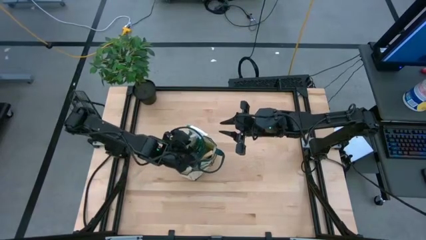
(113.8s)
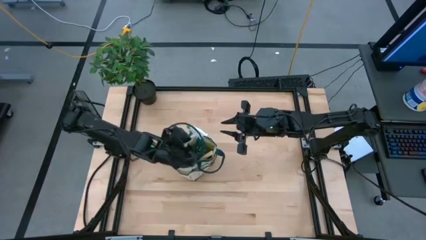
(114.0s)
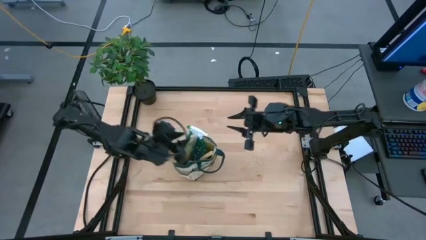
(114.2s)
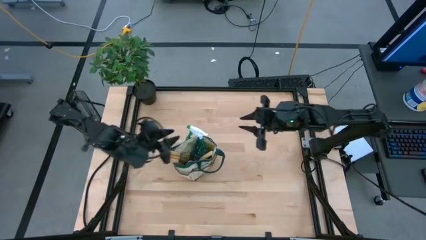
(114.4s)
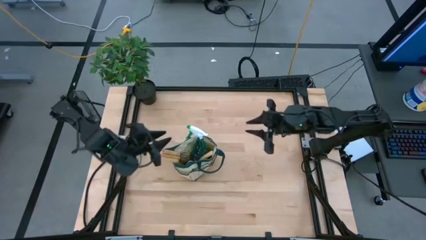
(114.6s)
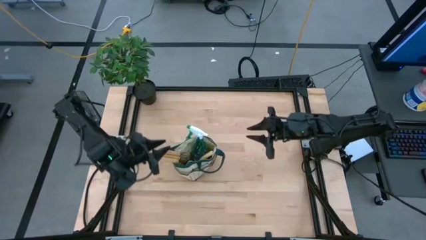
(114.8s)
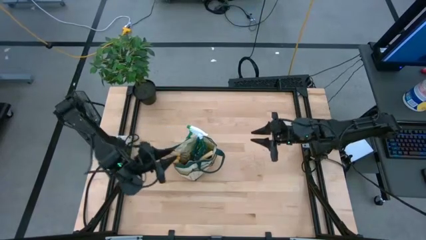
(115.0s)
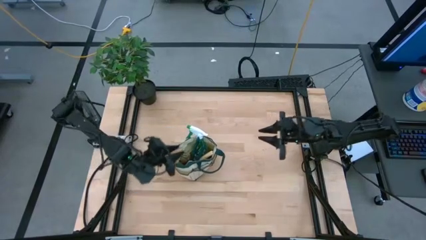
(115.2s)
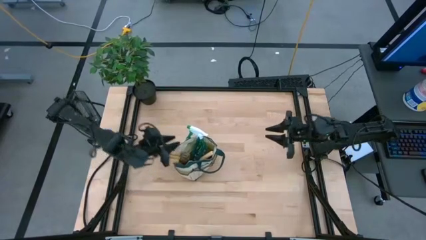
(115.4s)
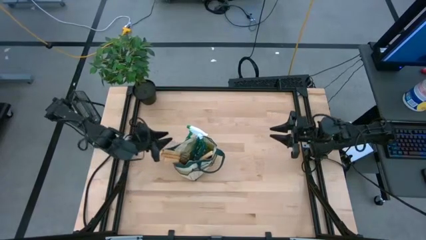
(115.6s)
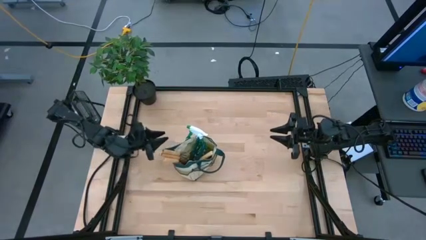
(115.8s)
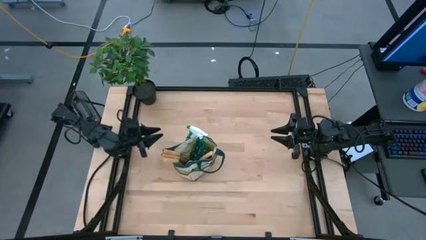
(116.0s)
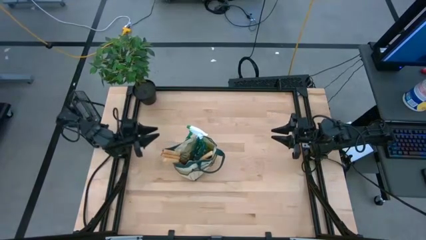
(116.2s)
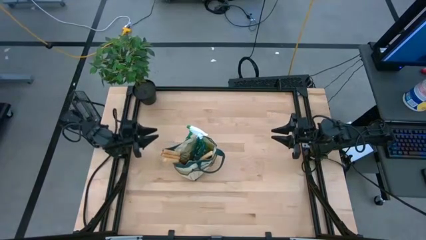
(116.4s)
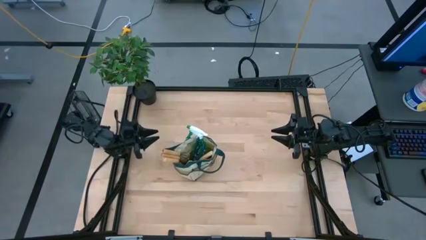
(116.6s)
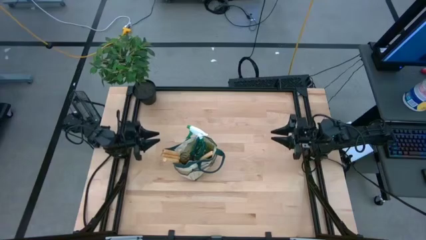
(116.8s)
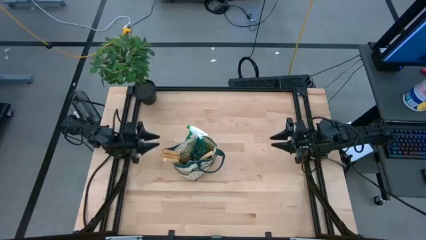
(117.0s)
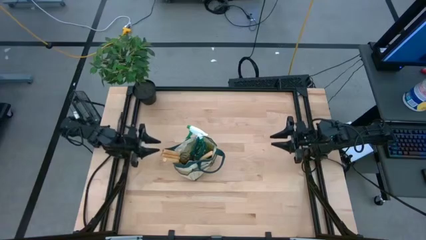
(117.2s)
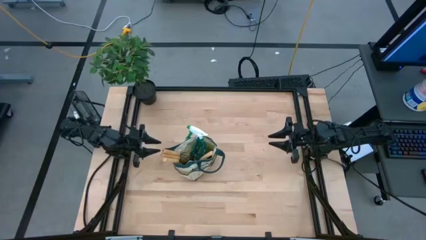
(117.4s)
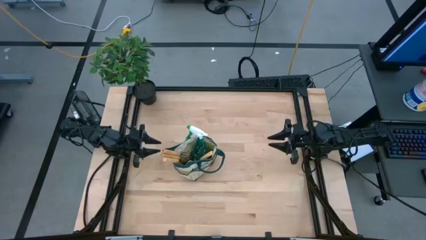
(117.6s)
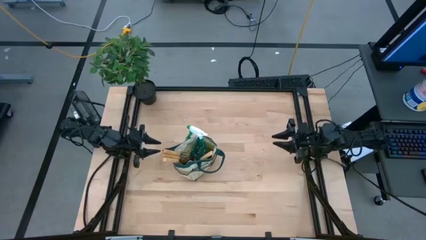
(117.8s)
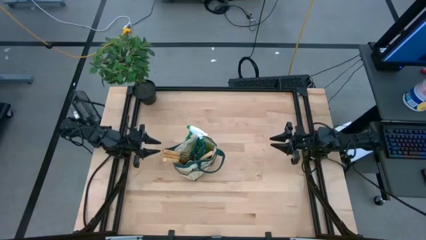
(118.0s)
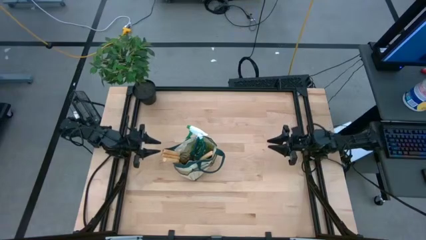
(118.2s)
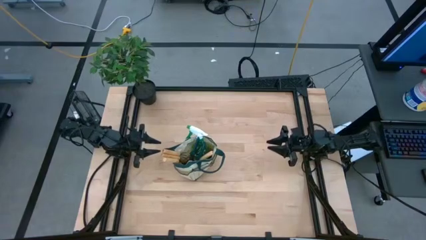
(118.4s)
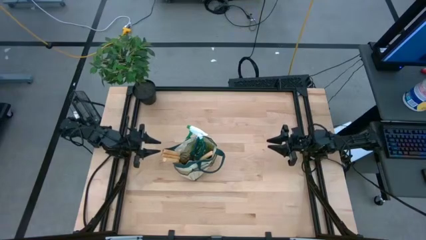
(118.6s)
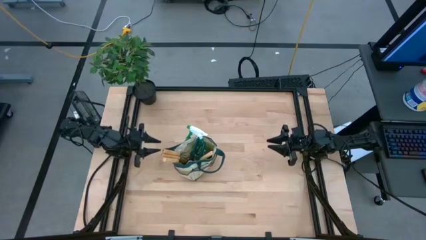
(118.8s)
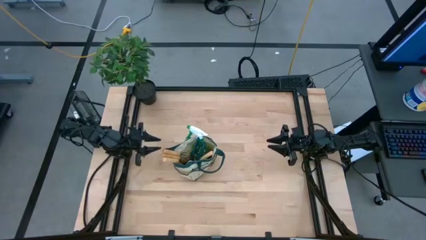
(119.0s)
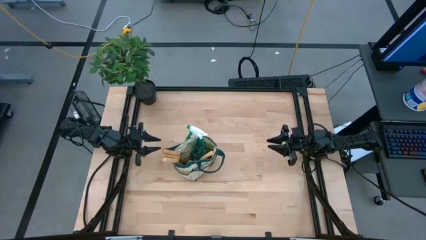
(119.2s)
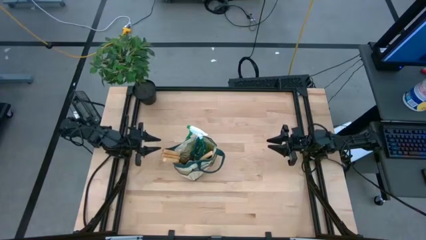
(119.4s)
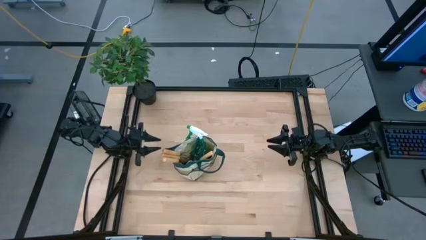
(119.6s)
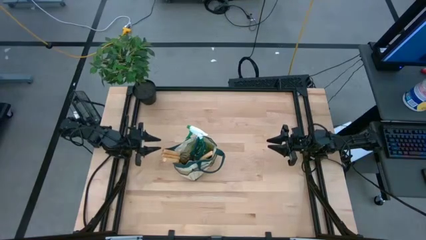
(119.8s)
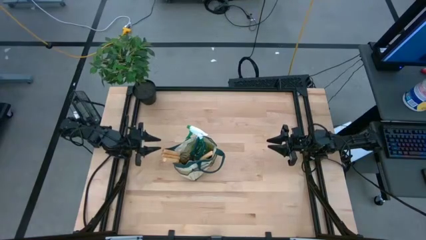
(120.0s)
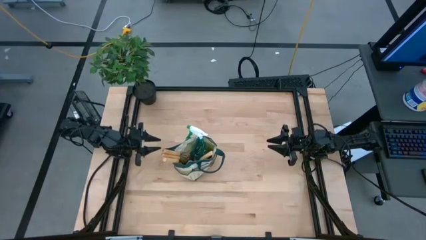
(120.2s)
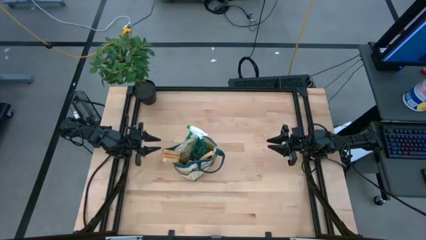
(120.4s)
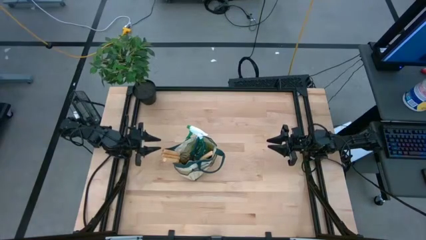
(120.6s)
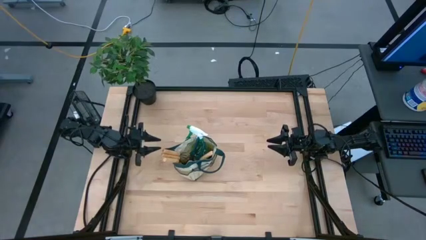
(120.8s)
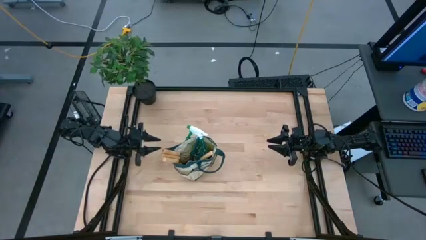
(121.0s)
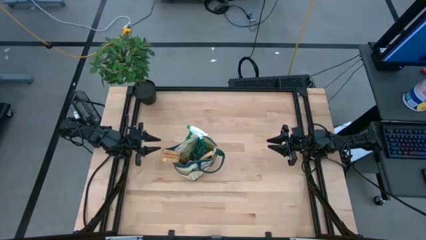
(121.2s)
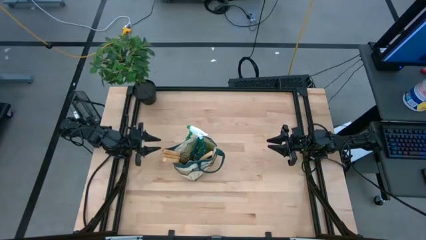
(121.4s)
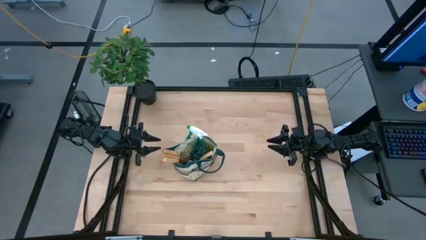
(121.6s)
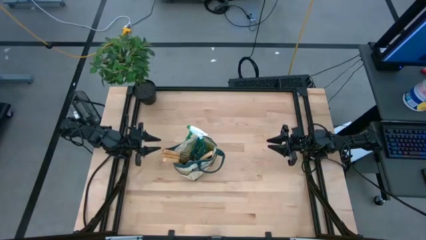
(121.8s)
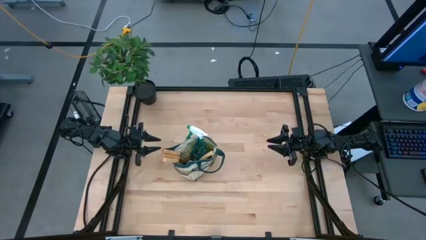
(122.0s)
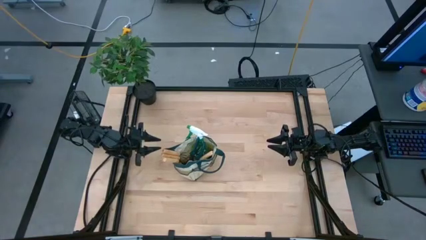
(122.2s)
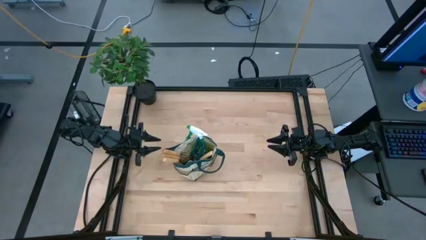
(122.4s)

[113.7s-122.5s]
Task: Pick & Place Garden tools in Gardening bag
Return to Home Position

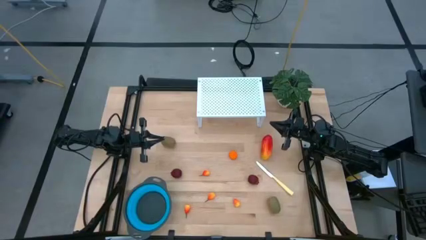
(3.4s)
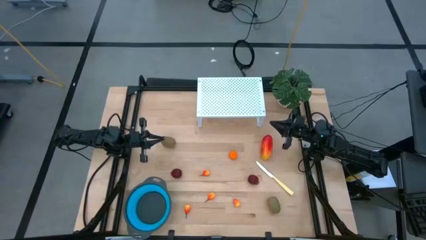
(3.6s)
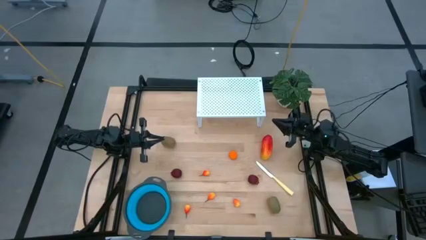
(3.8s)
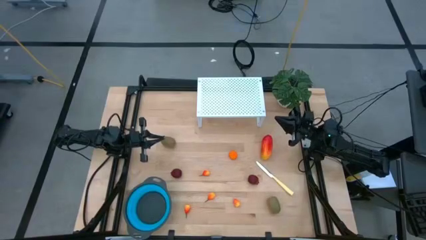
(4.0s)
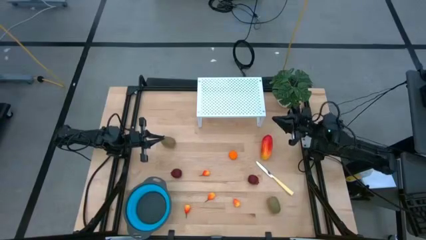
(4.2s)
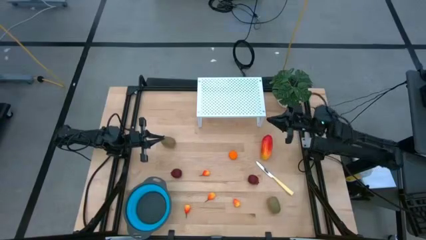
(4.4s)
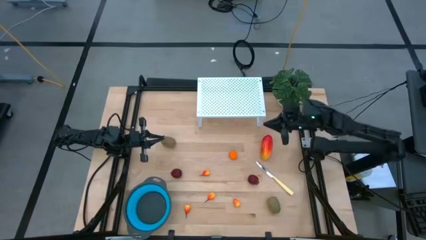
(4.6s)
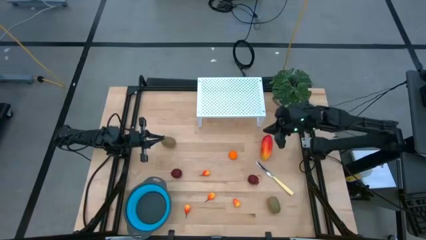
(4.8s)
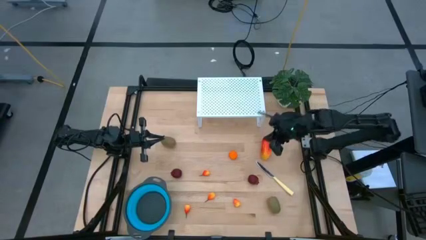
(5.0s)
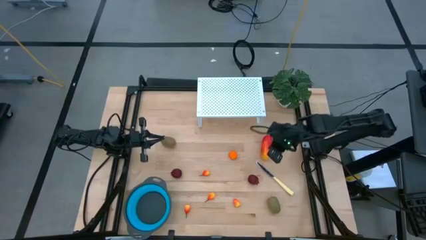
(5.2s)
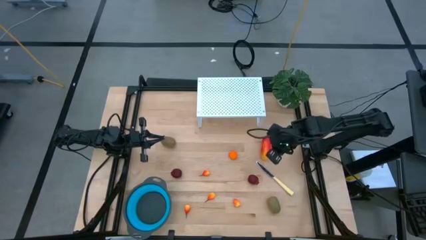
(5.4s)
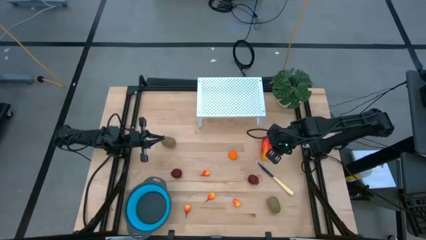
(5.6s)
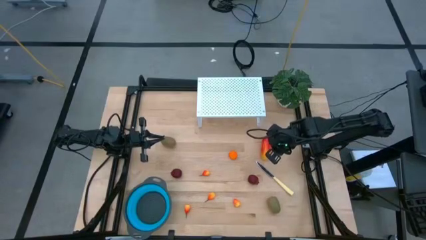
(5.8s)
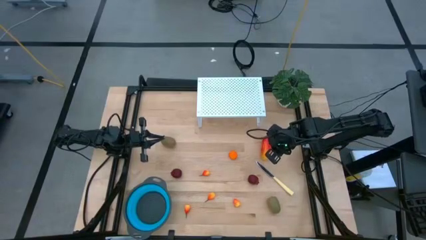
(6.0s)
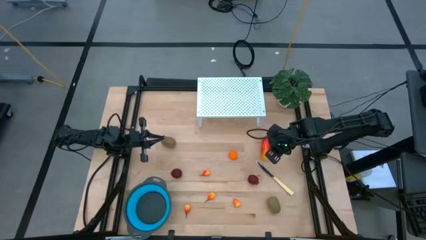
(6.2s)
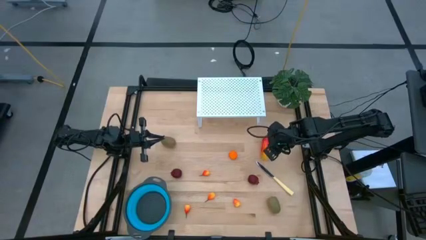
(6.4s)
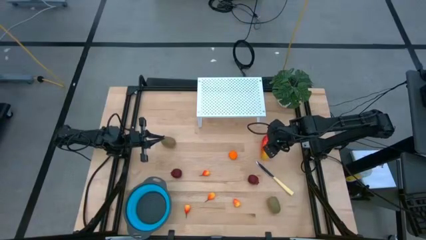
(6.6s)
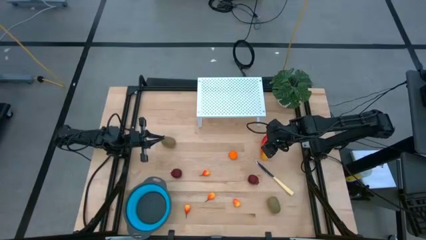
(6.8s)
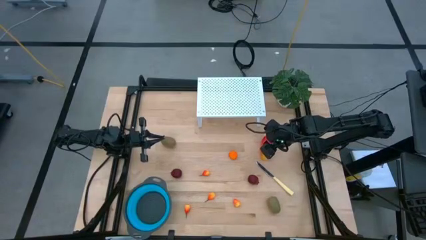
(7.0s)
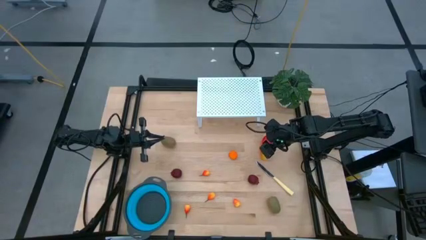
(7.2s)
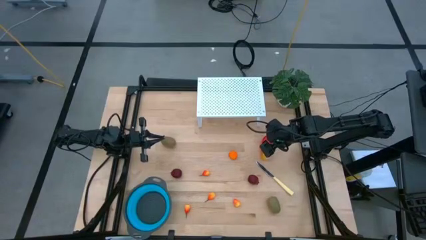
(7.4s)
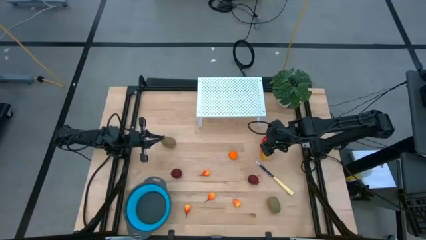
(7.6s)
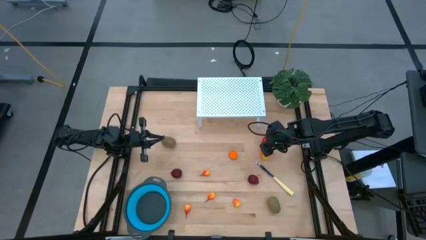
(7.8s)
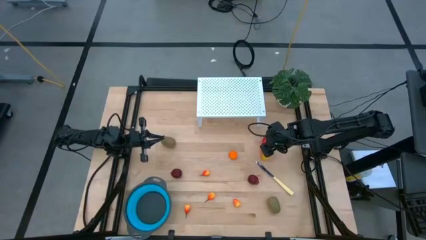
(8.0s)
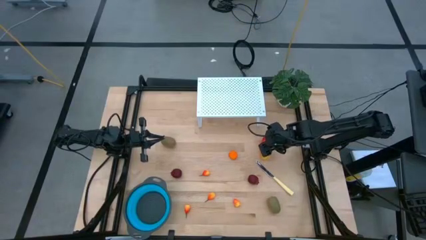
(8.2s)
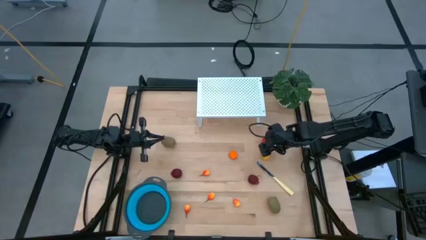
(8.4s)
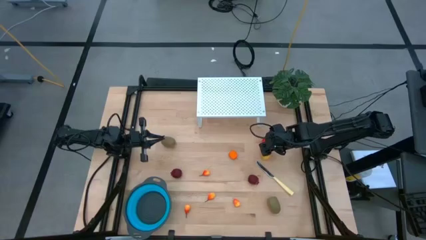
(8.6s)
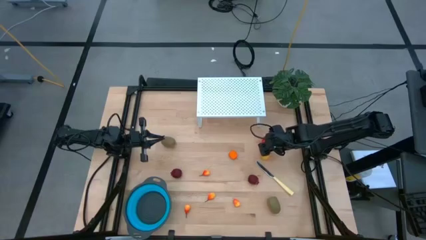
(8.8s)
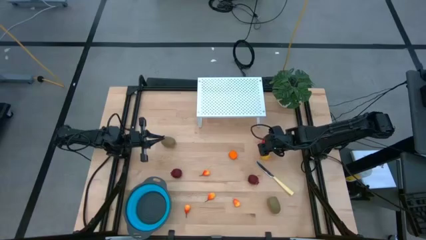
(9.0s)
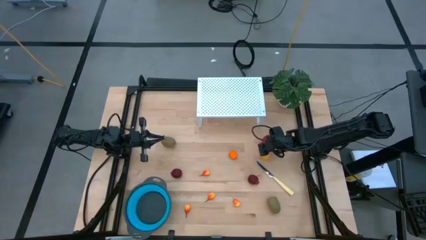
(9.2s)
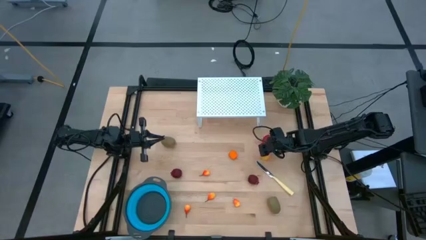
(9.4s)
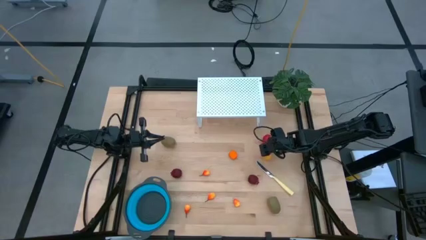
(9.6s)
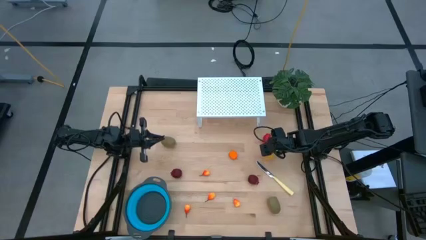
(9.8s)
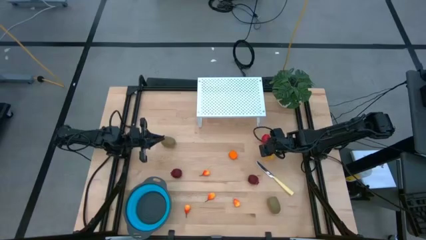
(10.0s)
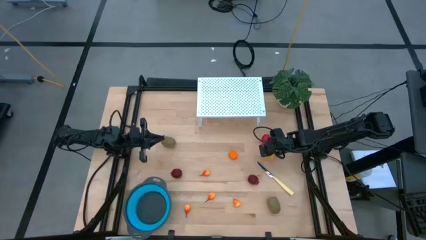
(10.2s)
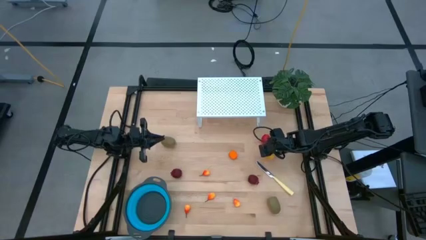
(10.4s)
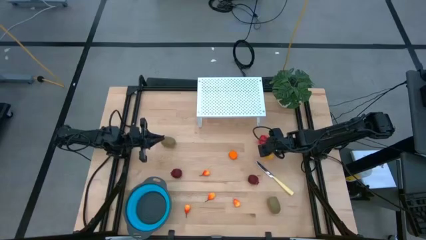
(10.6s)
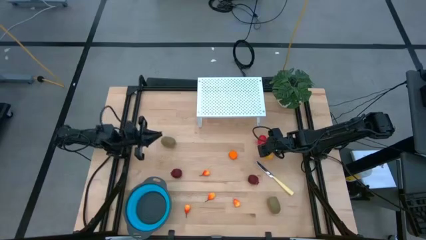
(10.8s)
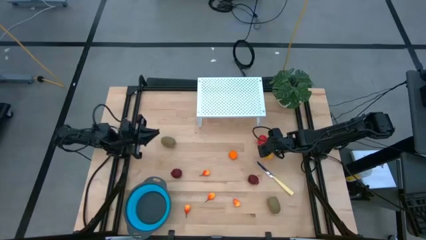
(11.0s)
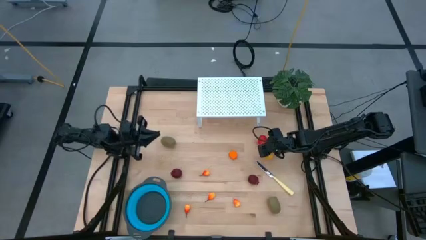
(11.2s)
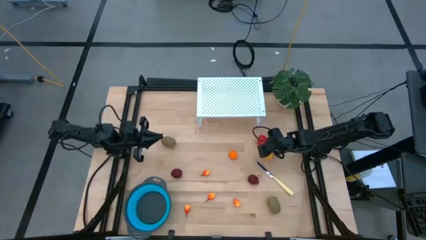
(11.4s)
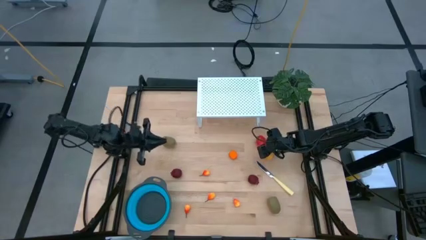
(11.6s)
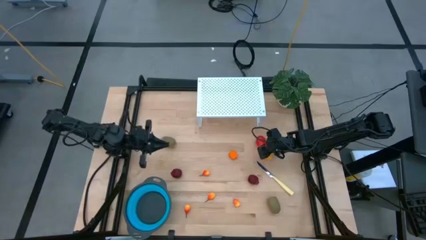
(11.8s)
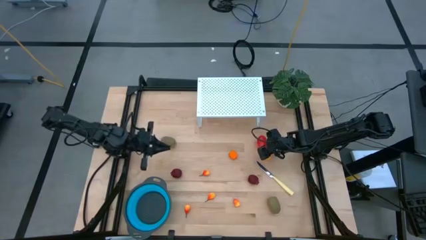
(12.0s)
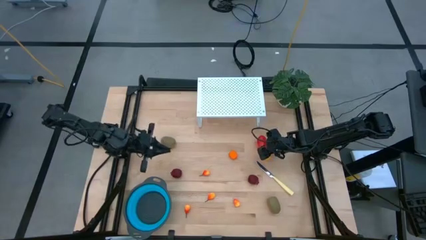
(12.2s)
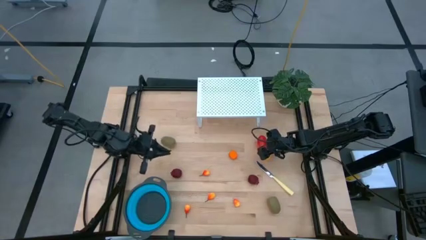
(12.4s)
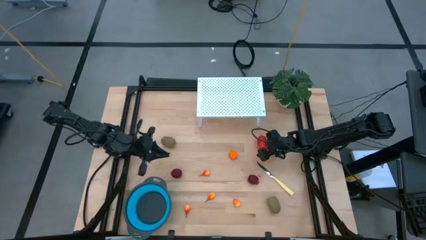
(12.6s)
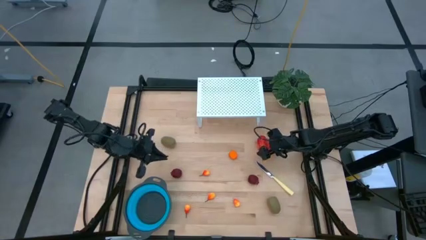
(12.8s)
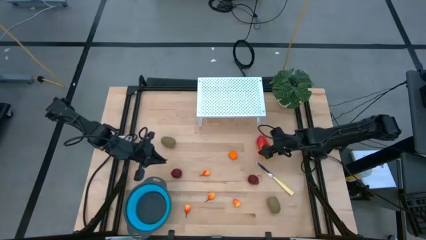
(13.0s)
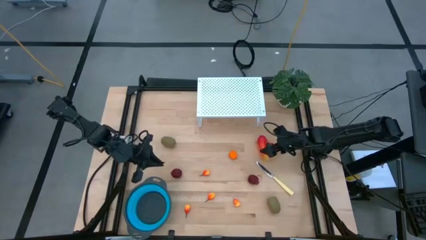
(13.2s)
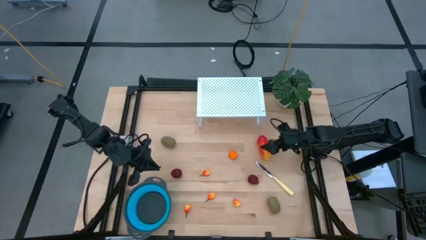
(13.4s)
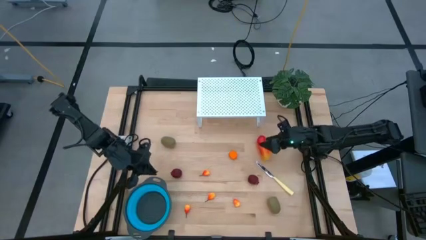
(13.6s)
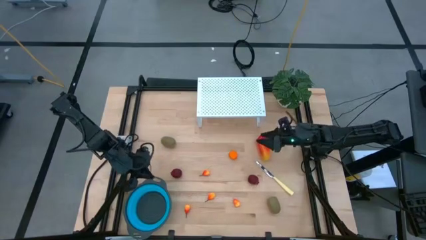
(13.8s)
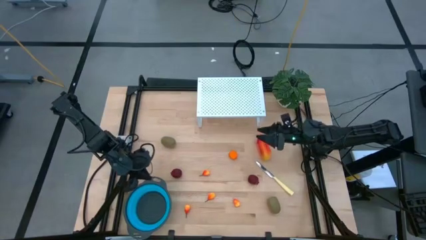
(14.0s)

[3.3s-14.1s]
Task: Pick & Place Fruit
Put the blue strainer bowl on the shelf
